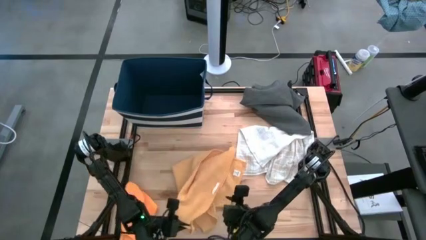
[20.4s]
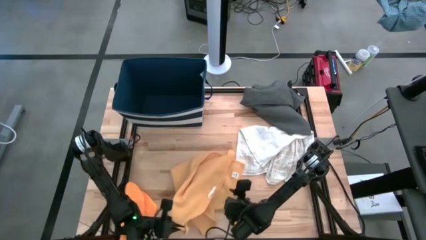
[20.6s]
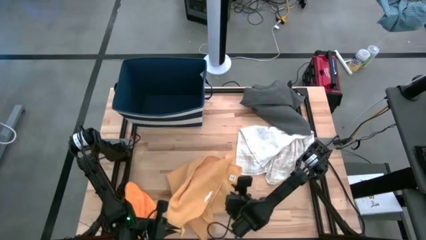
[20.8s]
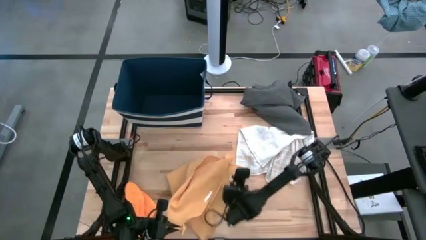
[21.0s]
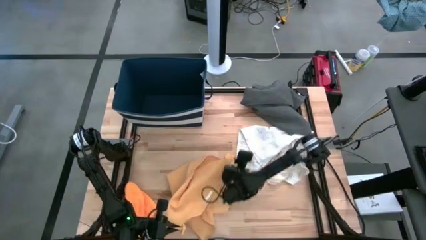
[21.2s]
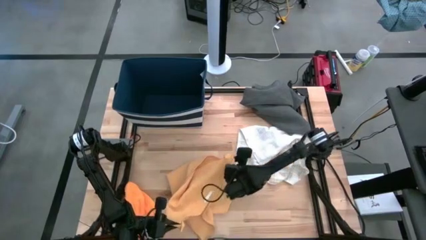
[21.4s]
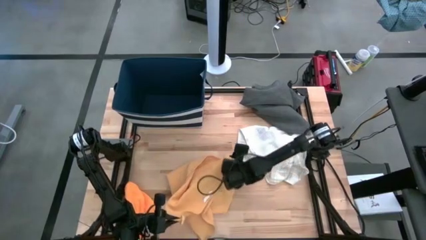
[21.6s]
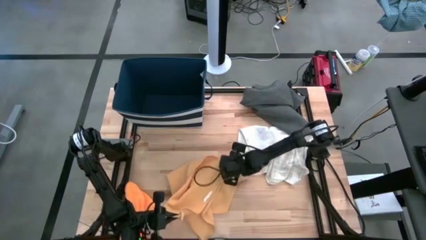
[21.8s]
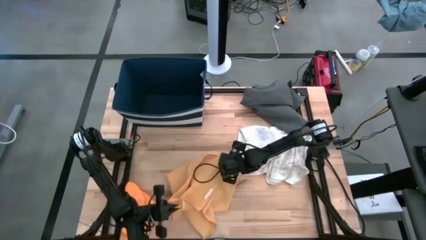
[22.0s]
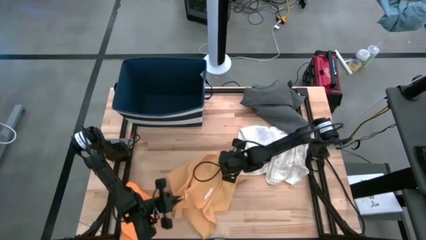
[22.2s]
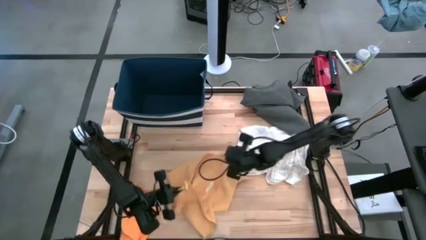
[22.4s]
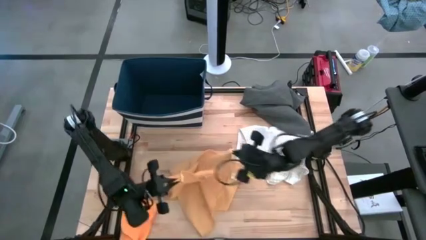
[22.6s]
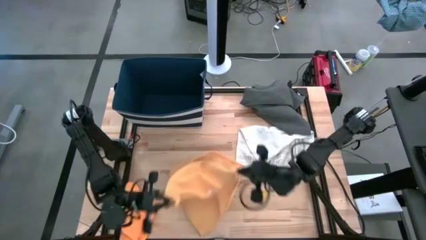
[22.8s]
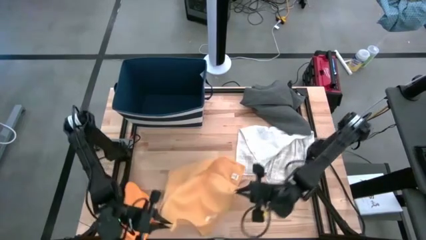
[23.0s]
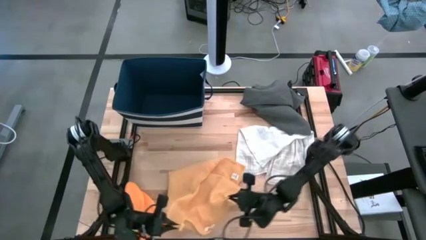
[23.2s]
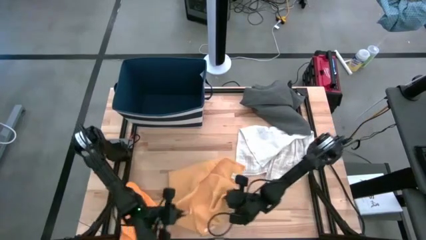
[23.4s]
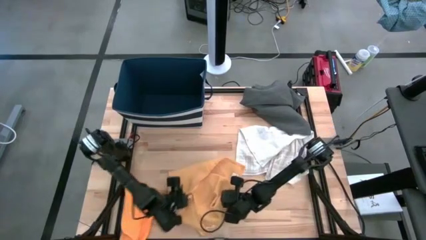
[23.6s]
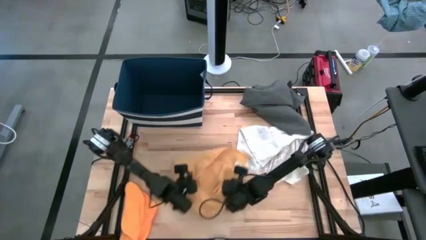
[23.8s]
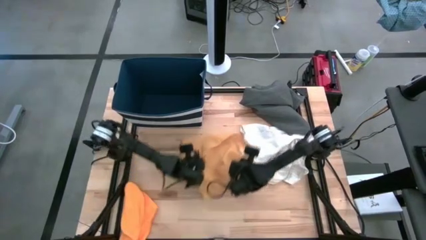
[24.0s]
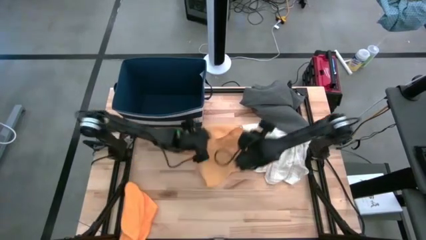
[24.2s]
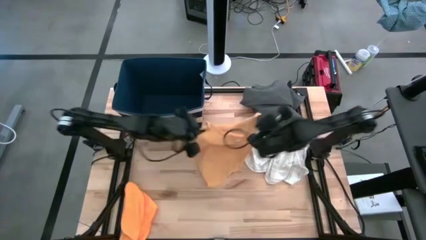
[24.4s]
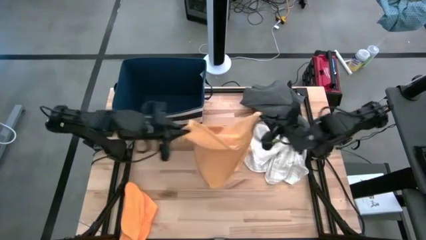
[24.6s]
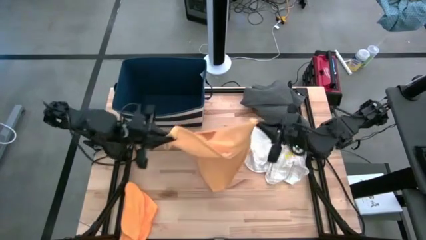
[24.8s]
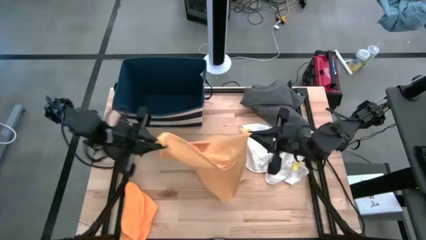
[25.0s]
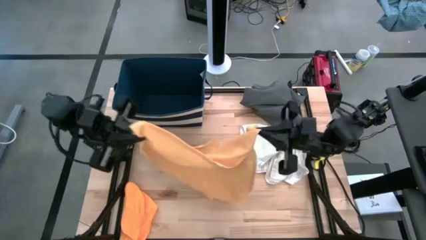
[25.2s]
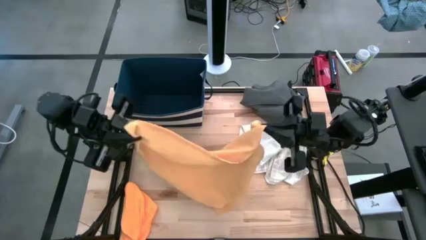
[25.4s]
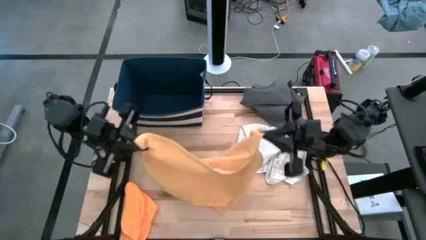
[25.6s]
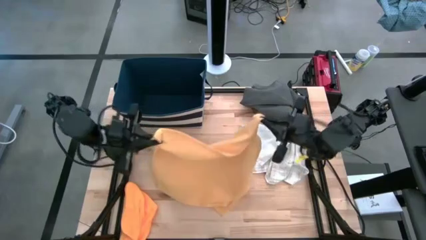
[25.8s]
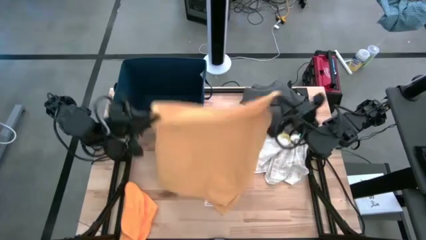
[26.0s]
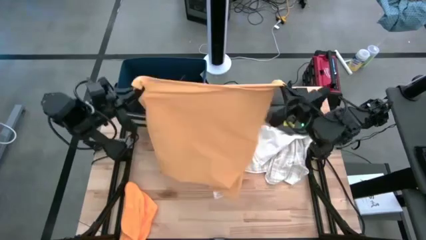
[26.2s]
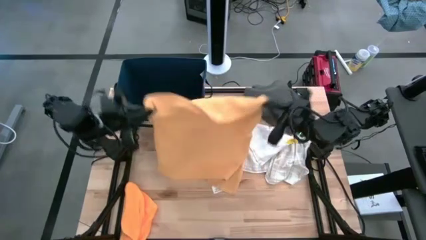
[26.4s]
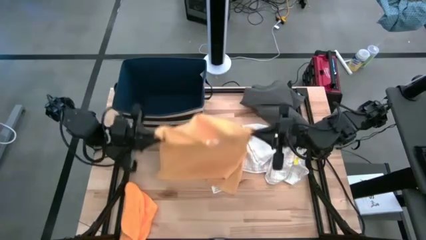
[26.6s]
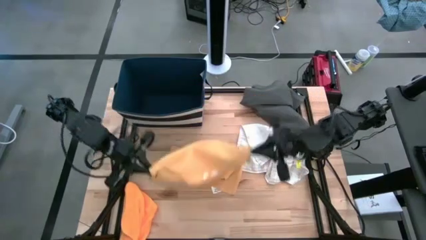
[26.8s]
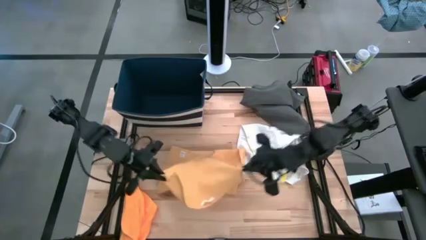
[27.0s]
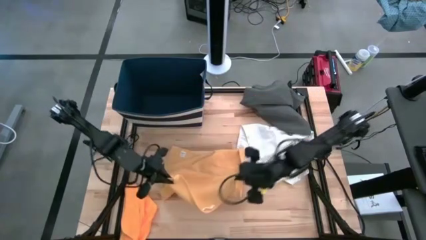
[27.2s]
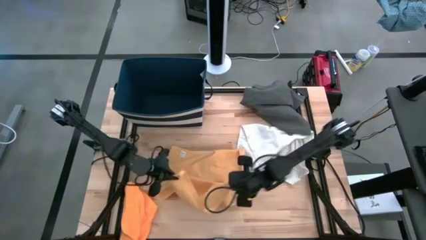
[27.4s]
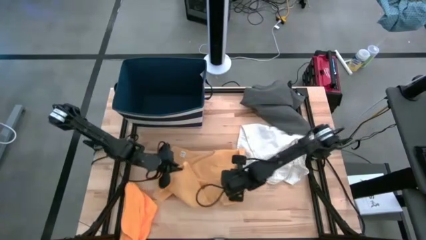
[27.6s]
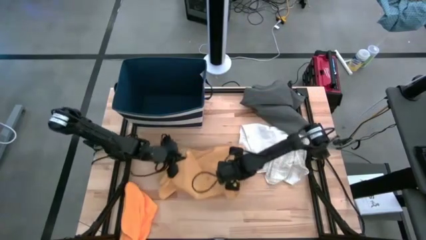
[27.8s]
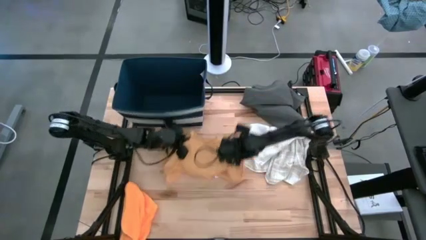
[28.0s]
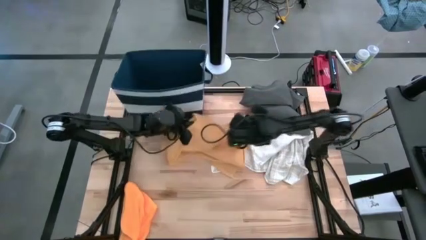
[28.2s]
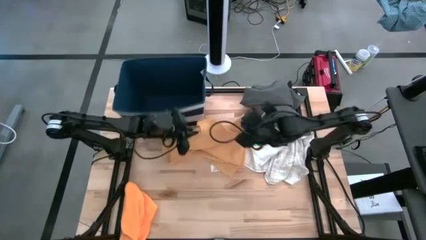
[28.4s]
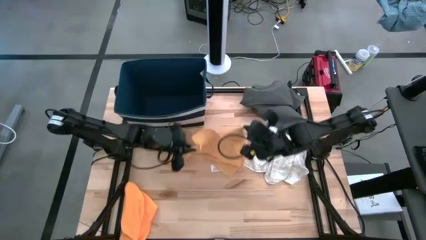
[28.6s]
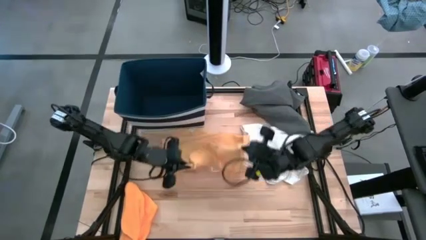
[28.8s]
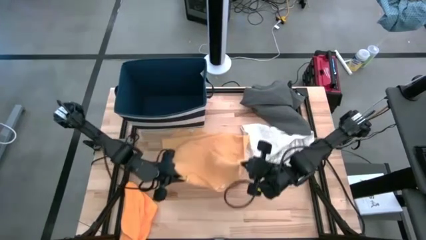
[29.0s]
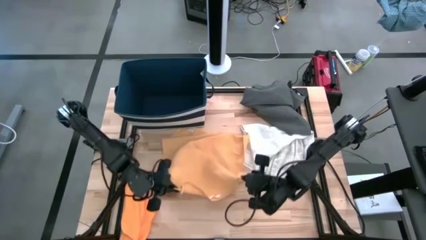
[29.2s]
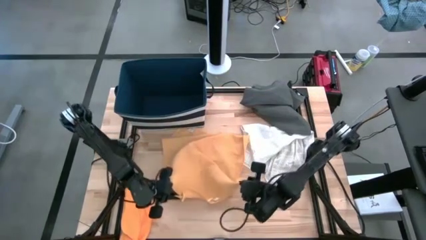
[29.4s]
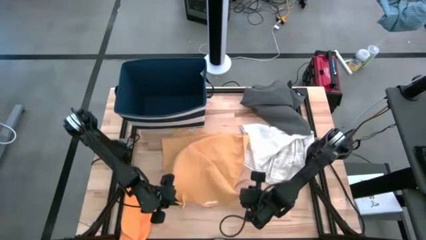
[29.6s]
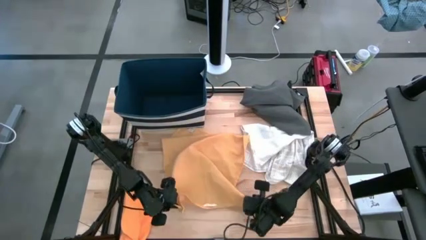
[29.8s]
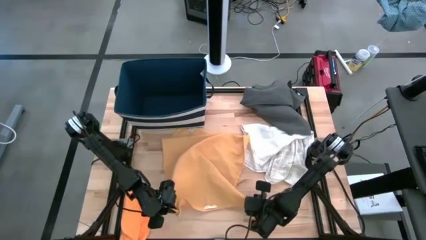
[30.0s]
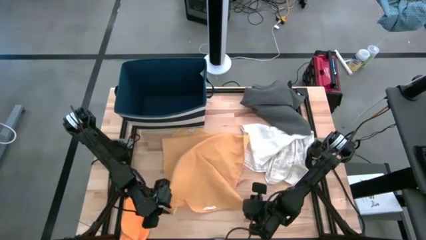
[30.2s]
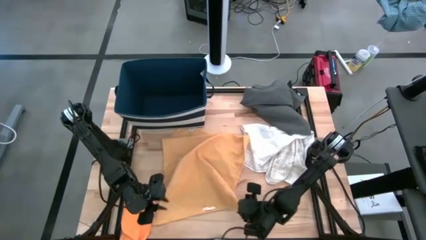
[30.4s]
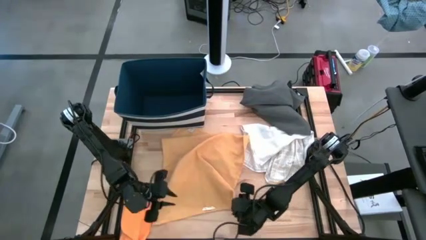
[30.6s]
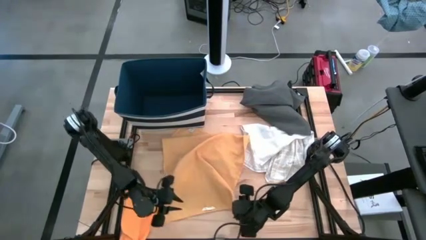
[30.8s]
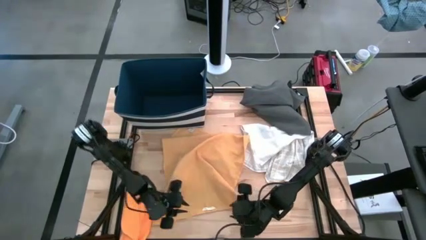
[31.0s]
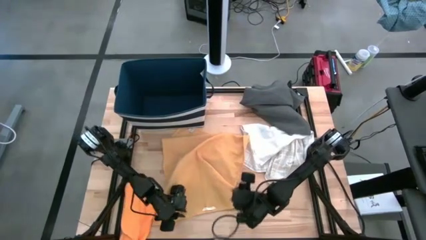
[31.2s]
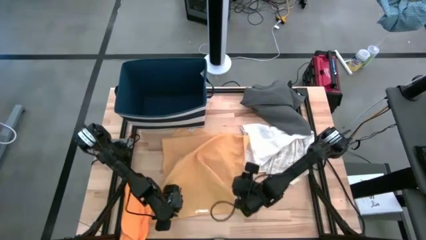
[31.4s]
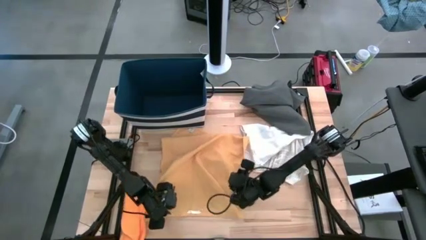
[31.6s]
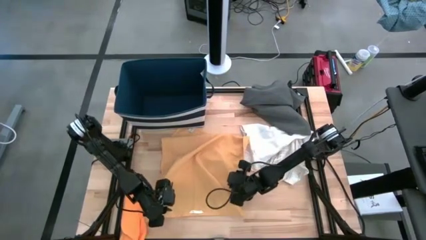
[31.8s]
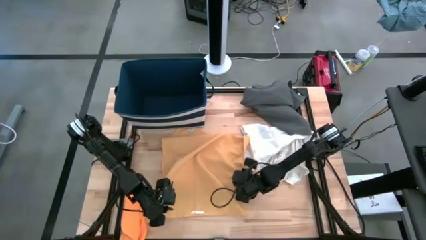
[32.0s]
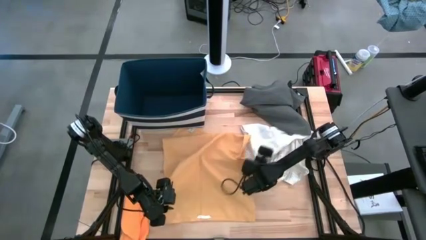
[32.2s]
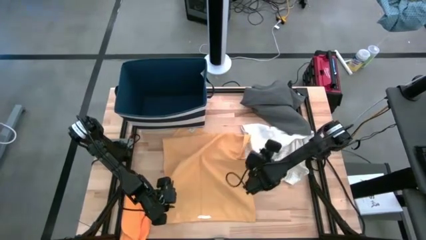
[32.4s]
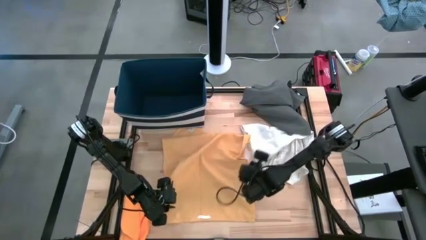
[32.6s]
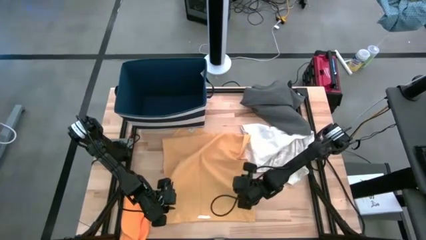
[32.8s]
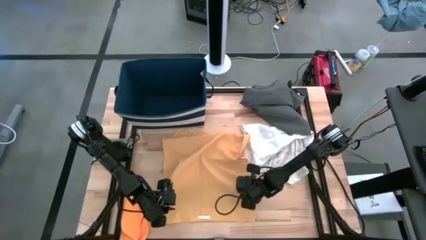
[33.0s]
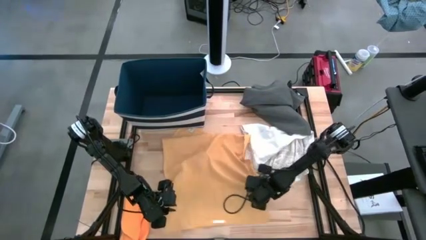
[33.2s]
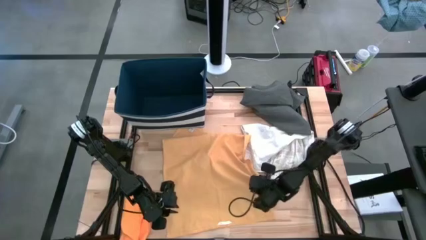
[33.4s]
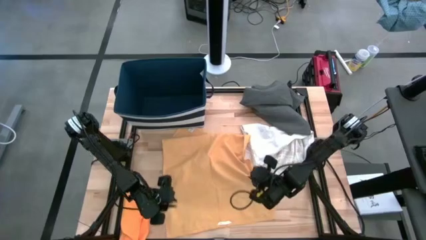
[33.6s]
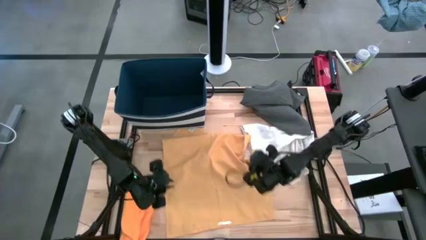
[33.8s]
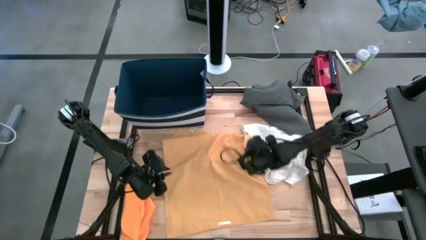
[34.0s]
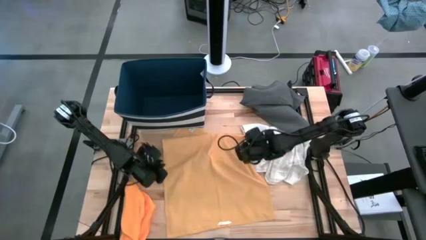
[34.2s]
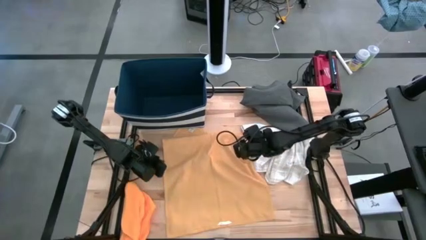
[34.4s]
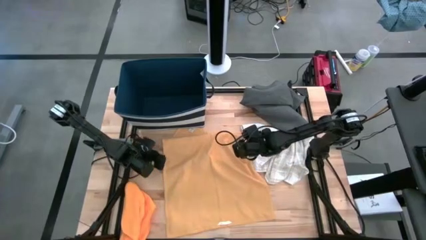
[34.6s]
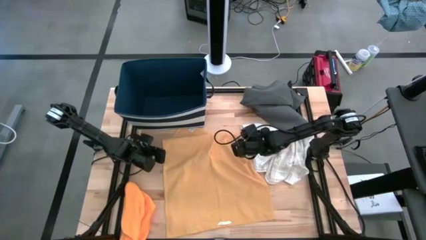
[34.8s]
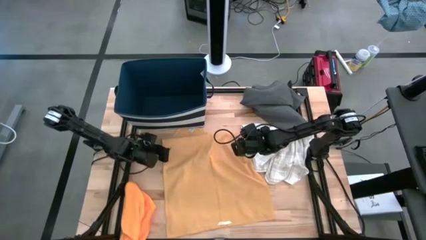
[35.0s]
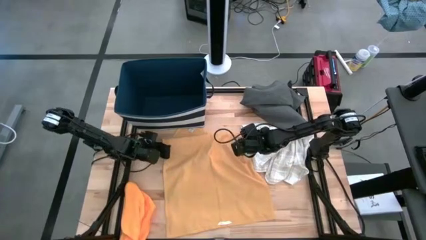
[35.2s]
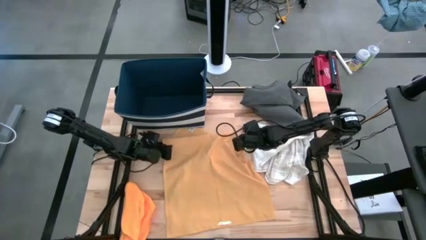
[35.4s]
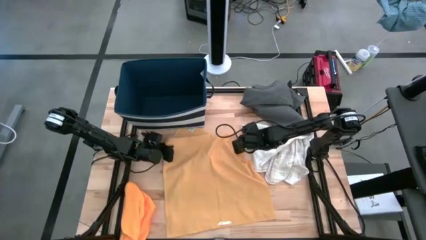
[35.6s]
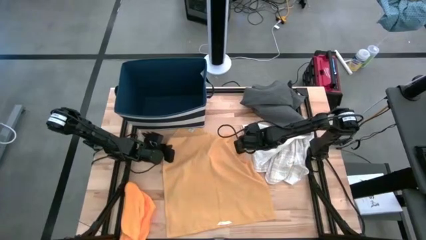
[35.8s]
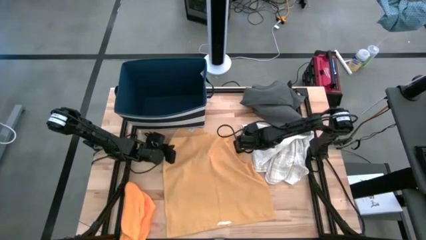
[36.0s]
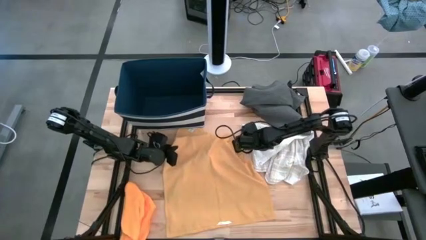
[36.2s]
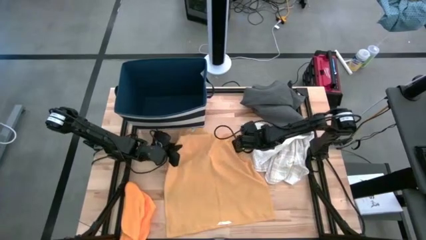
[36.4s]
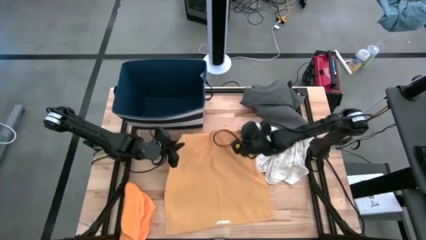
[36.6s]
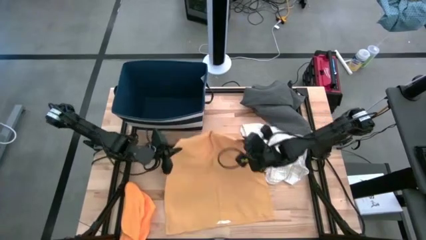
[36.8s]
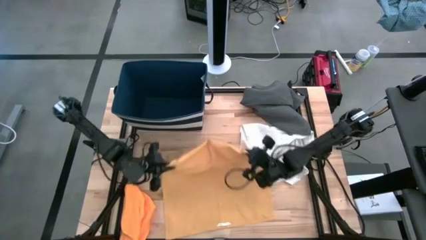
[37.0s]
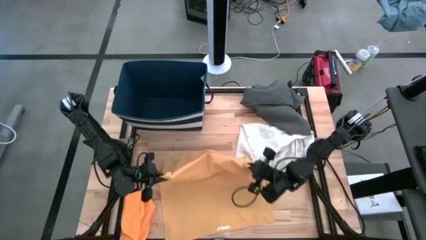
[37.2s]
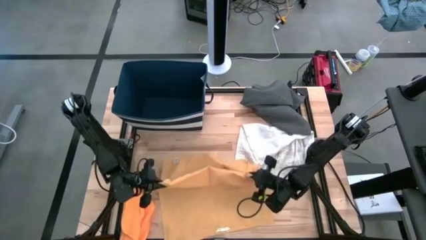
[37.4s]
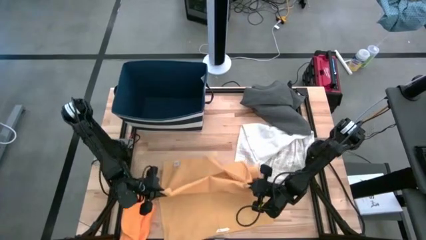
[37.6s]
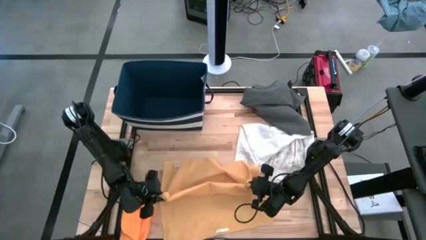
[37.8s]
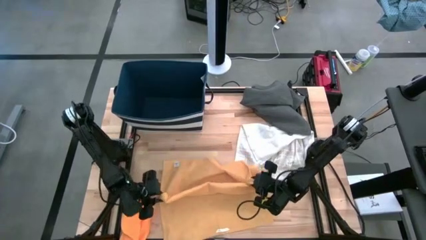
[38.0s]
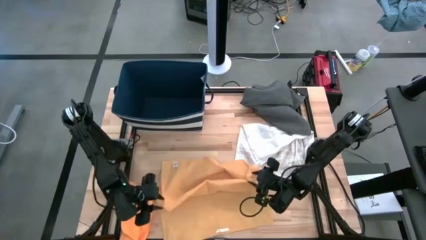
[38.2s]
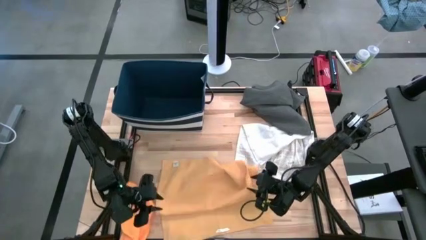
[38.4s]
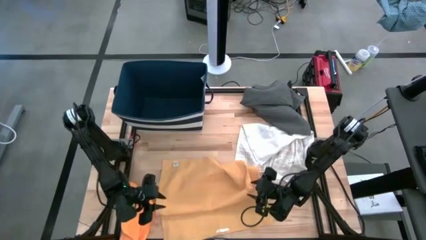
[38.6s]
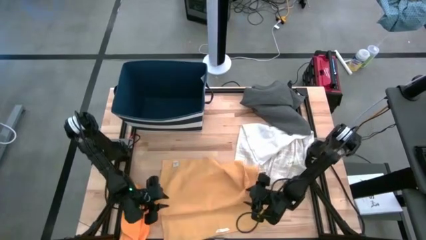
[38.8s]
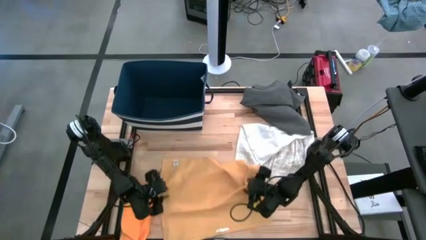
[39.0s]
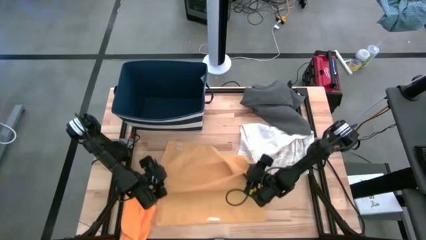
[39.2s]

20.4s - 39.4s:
Task: Fold towel
Fold the yellow kitchen towel
